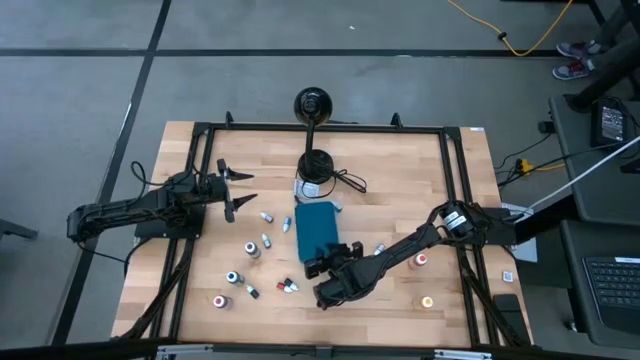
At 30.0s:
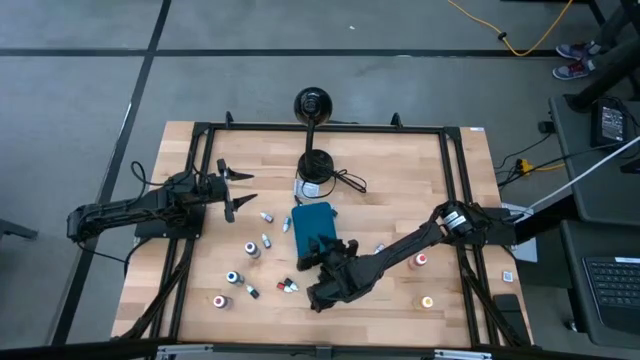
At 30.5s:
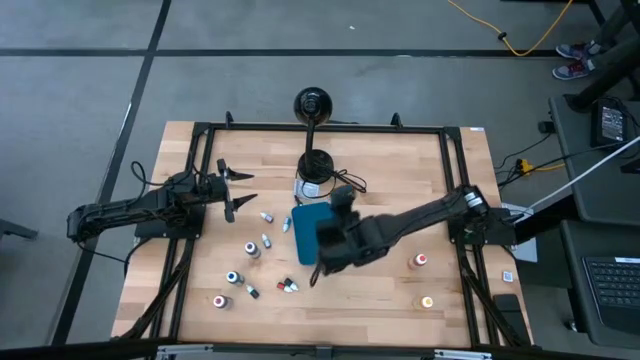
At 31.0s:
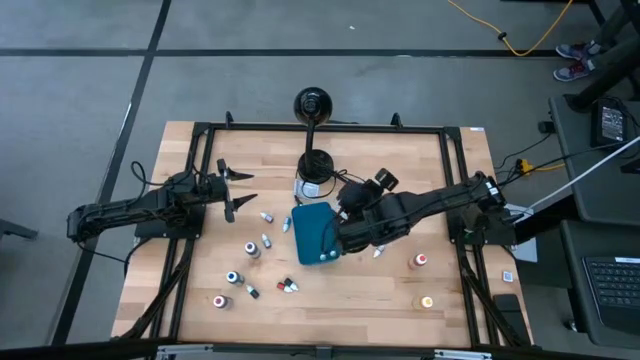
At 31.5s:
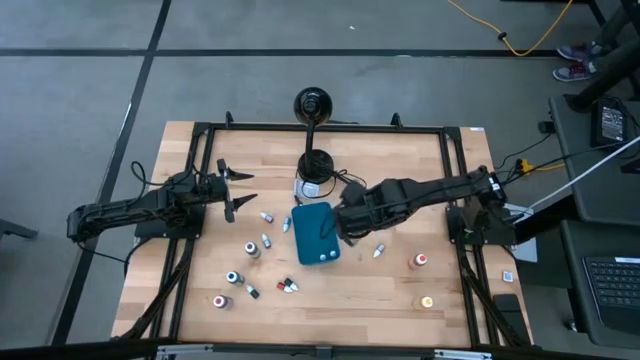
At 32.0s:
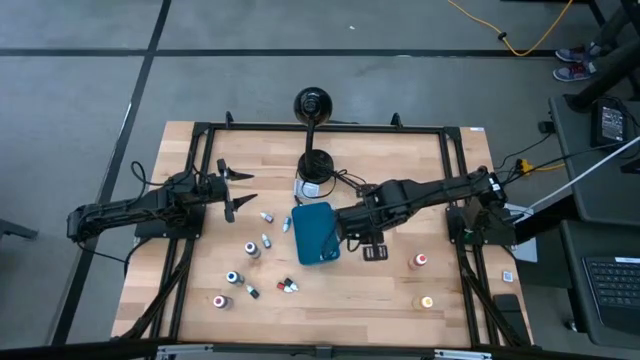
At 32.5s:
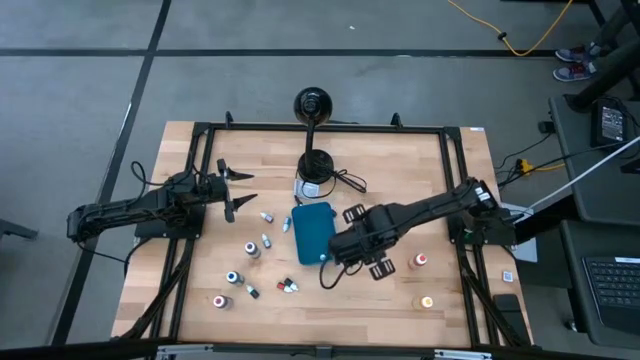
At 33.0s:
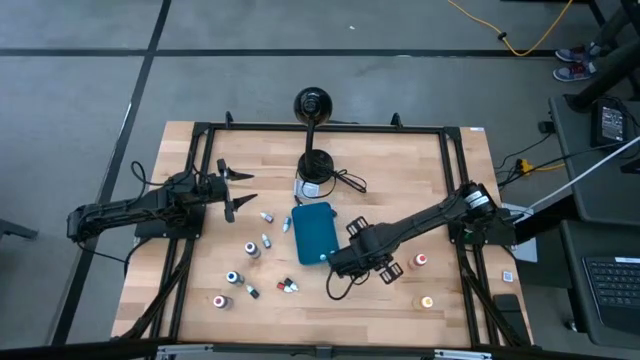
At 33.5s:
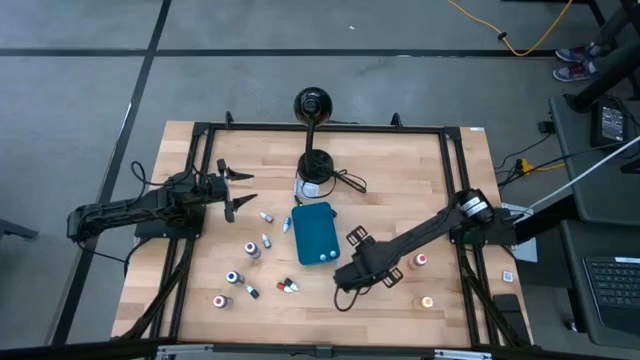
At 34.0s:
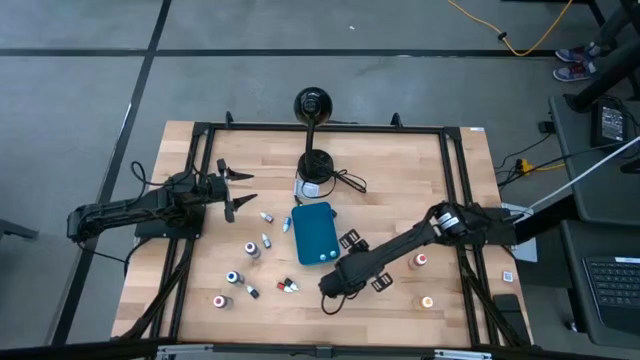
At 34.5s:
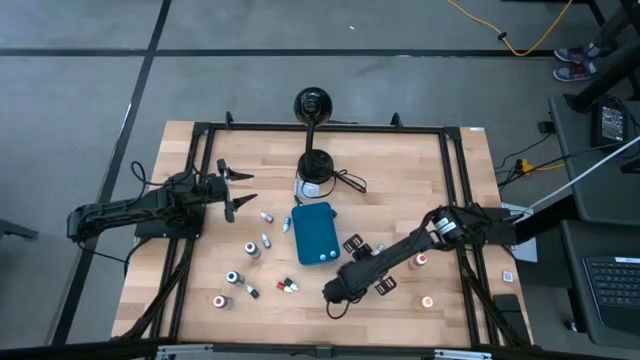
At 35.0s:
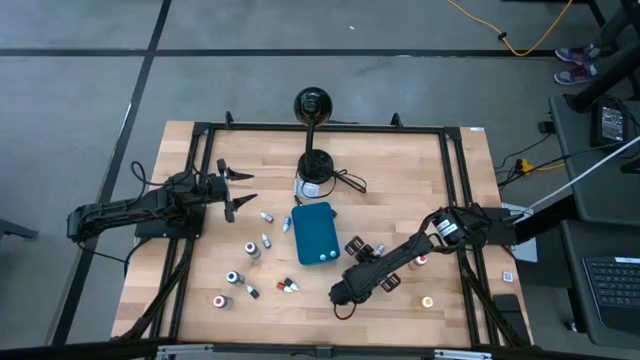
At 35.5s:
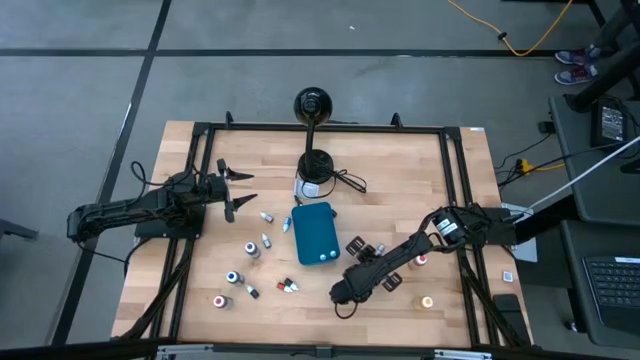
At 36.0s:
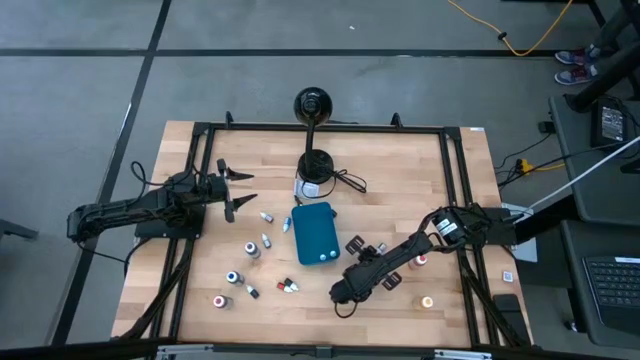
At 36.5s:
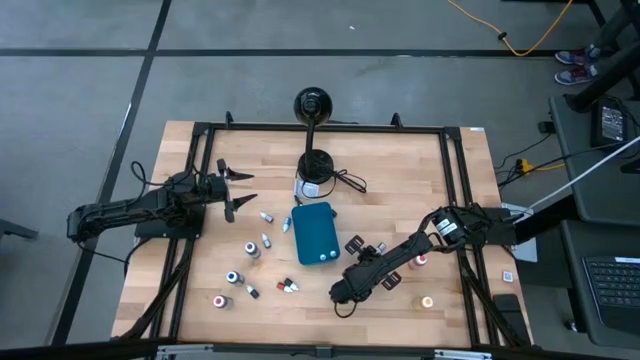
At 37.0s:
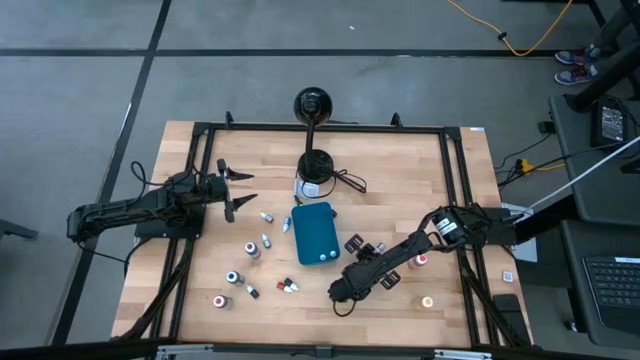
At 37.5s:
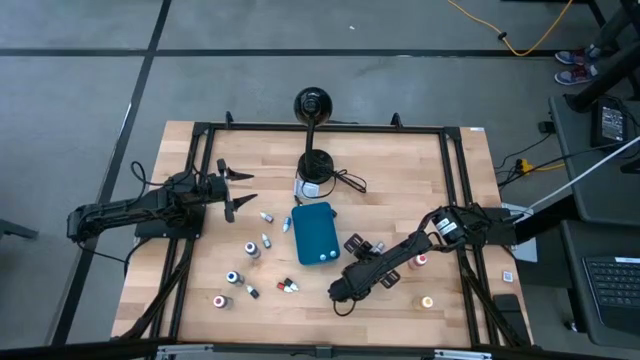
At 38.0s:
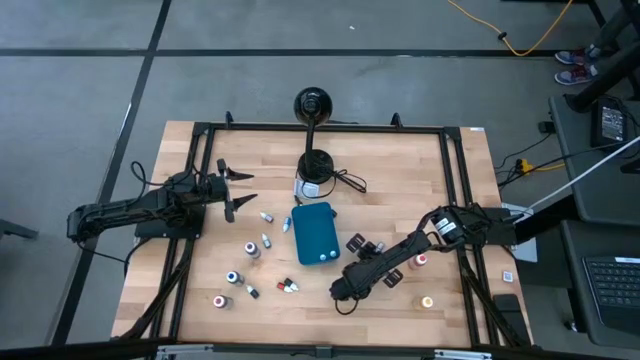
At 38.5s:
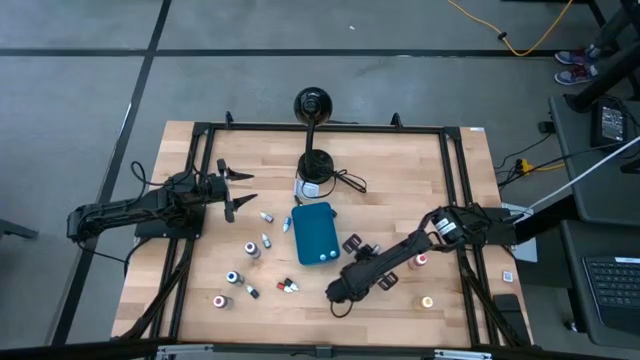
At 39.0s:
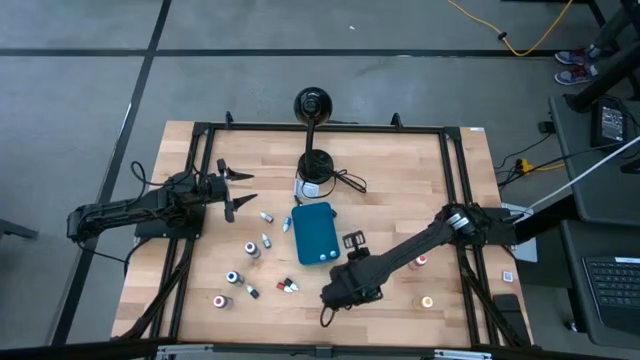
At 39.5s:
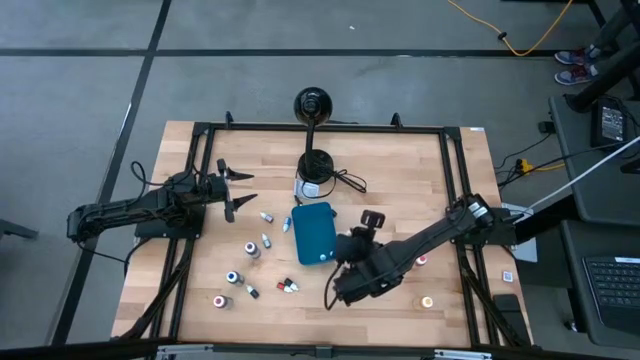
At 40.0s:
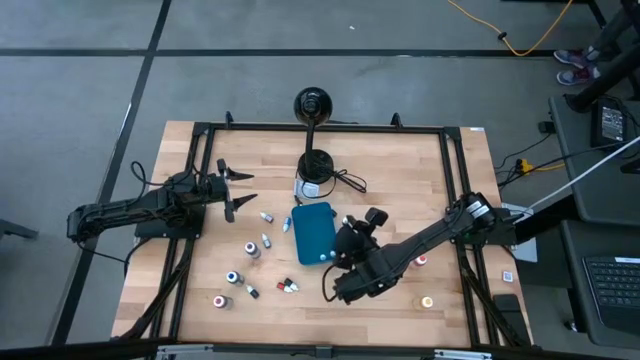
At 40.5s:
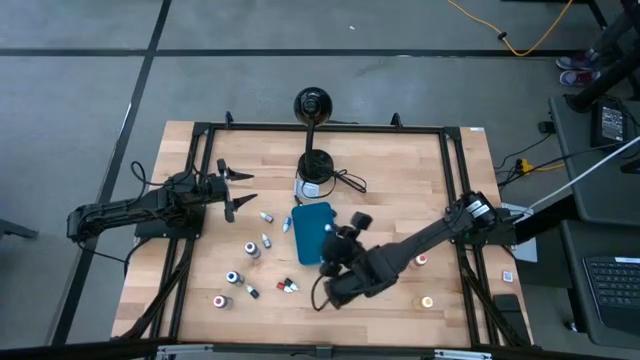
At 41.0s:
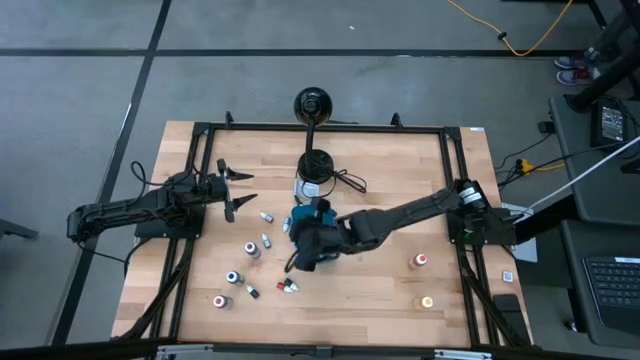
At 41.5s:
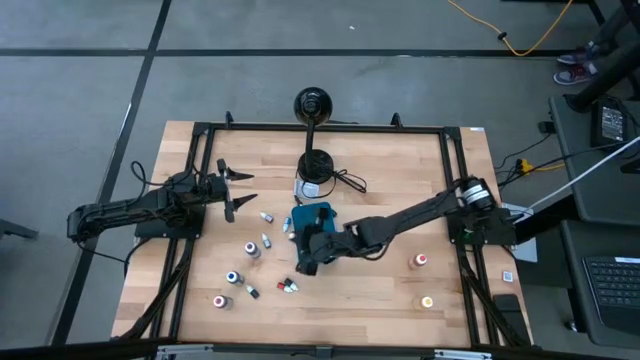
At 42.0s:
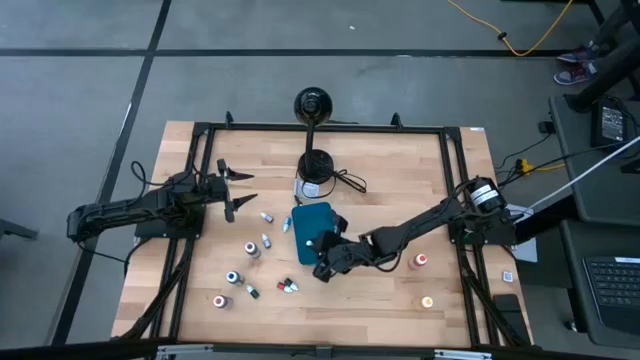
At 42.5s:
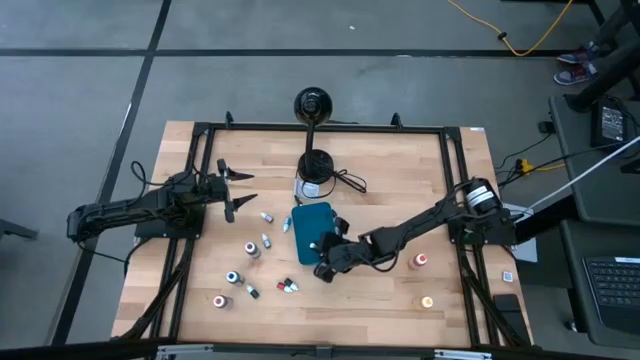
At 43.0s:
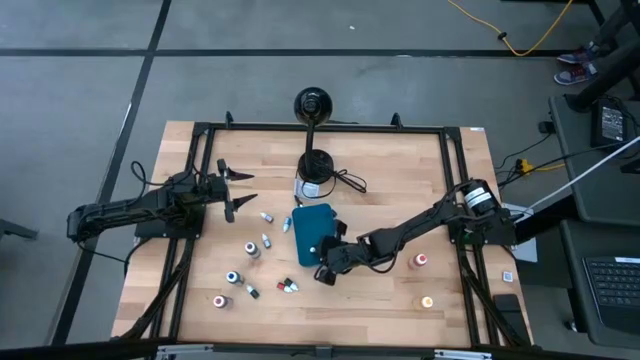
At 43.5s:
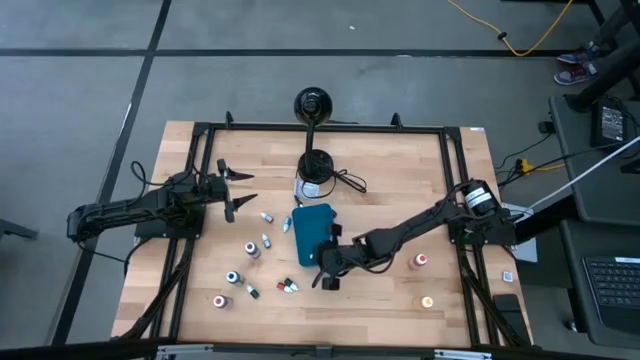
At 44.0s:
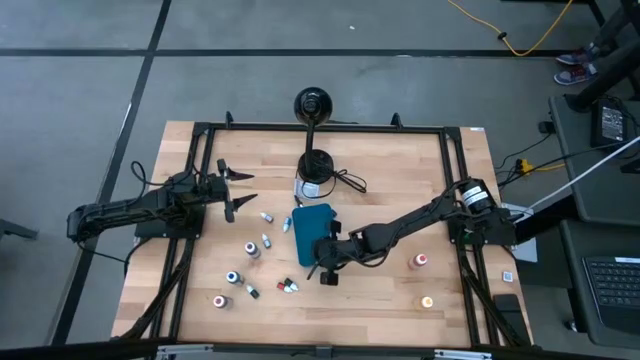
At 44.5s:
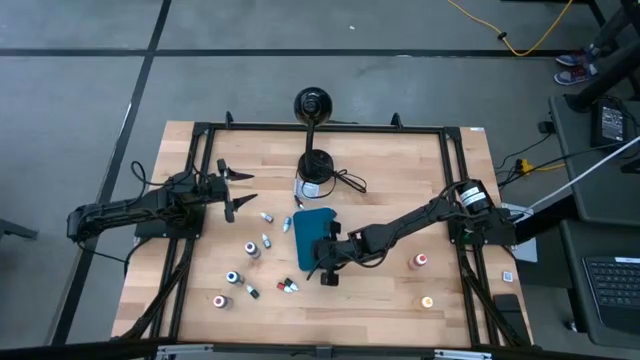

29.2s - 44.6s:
Task: Pick & Place food coloring
Put the pink small food coloring bottle into the bin

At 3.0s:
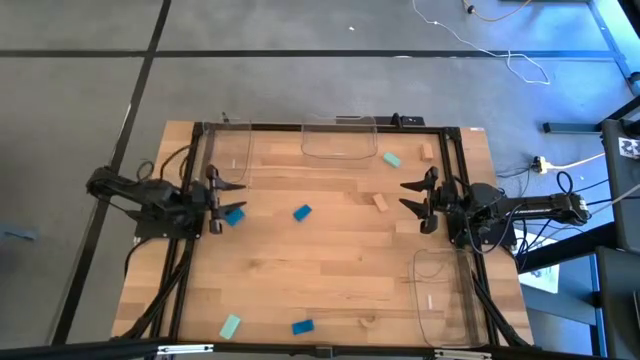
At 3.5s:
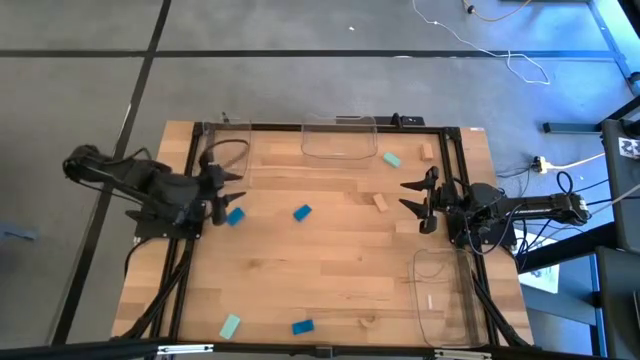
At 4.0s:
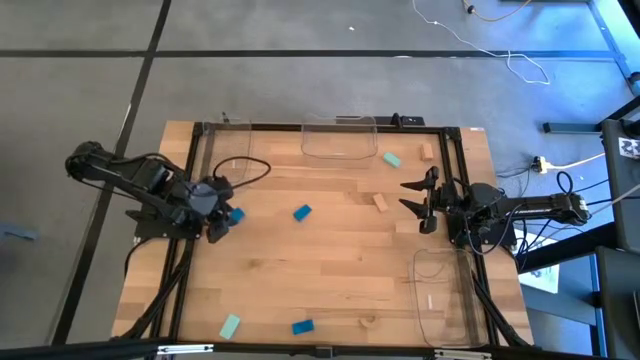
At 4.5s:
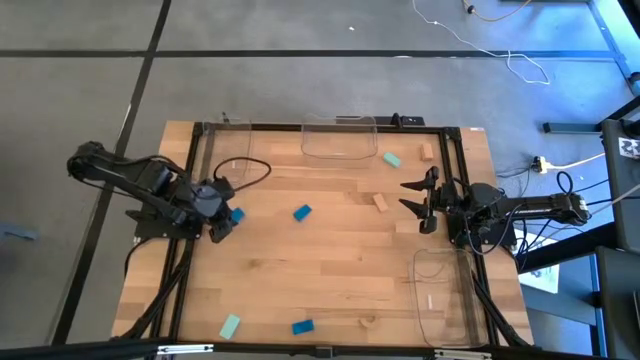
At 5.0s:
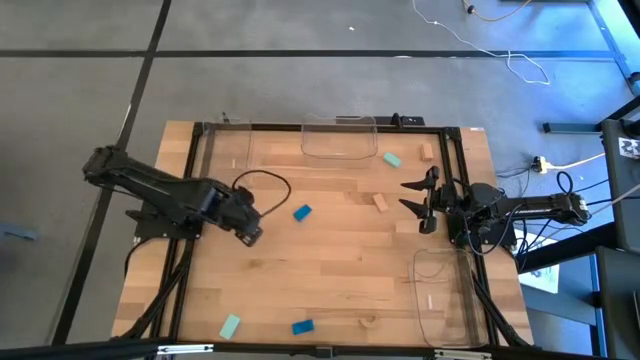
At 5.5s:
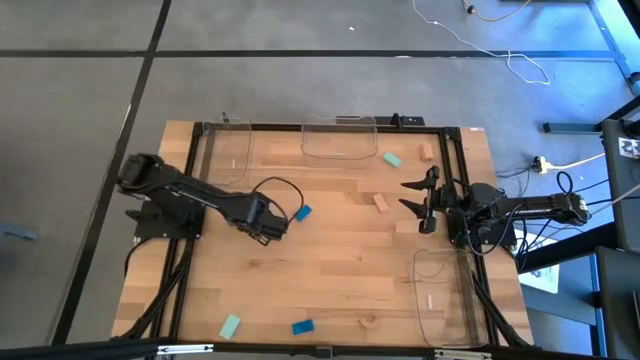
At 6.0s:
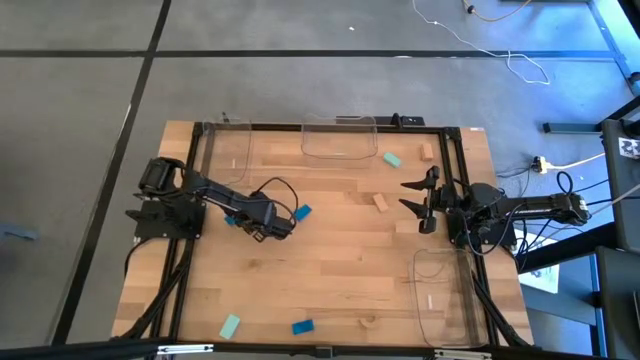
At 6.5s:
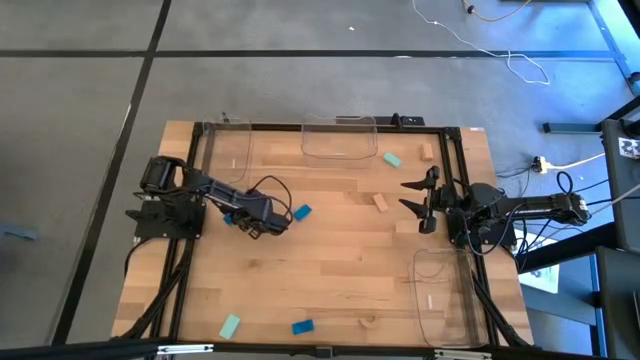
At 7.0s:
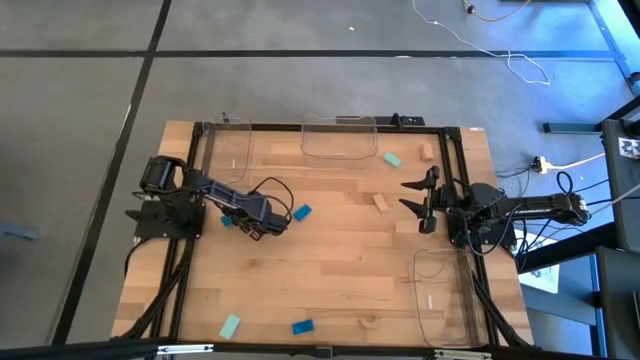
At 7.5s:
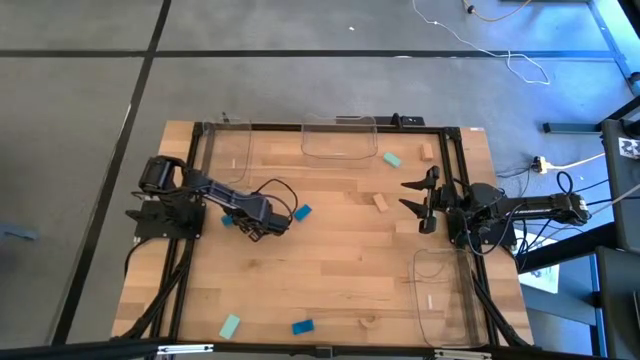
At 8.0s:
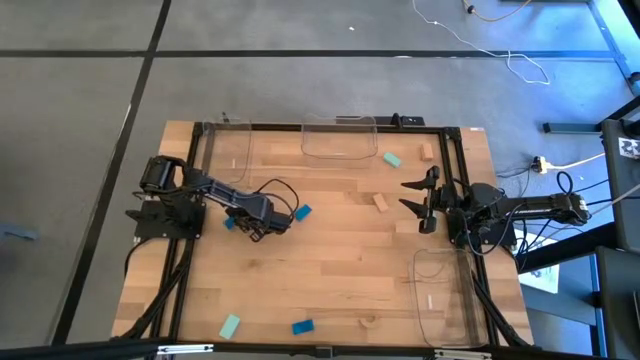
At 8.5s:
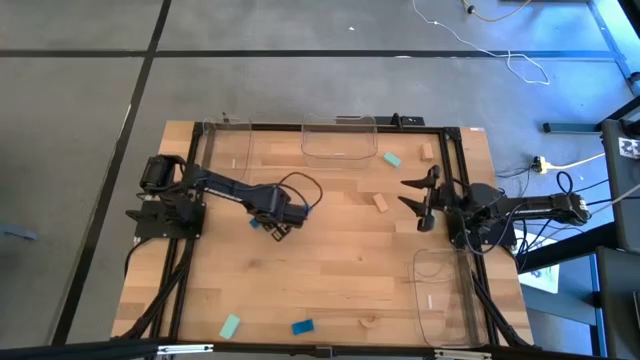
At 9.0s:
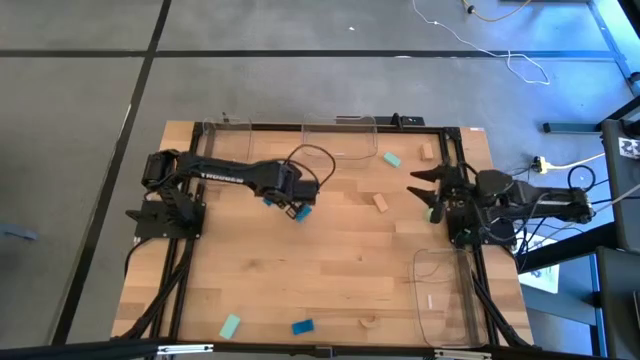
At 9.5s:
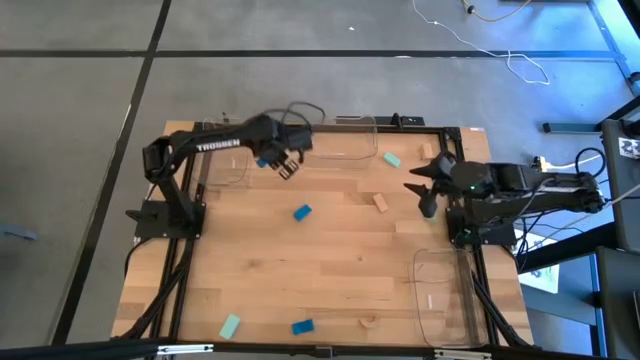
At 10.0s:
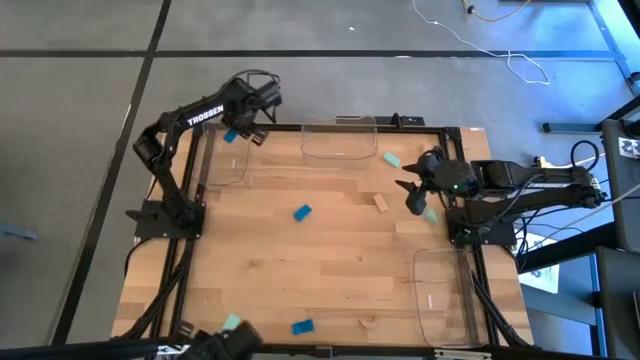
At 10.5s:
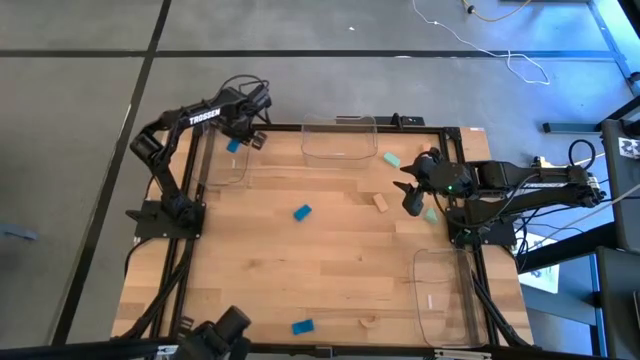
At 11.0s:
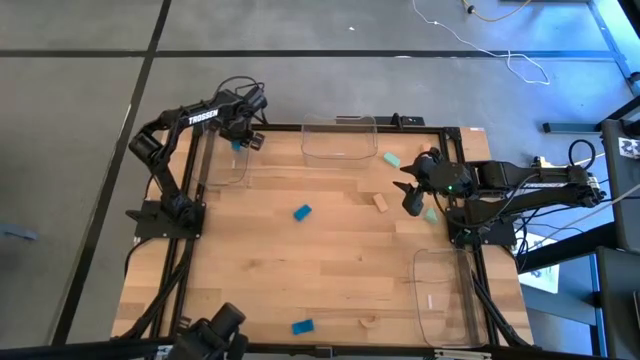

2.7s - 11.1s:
Task: Sort & place blocks by color
Put the middle left blue block into the top left transparent bin
